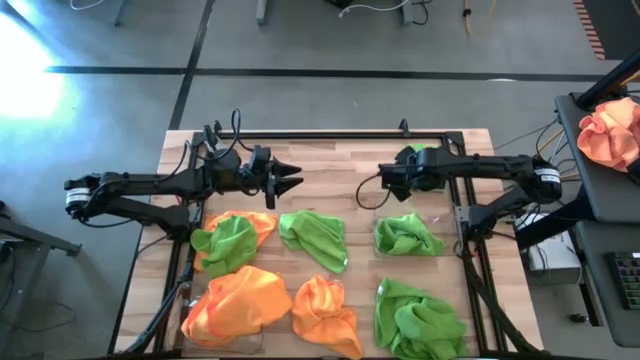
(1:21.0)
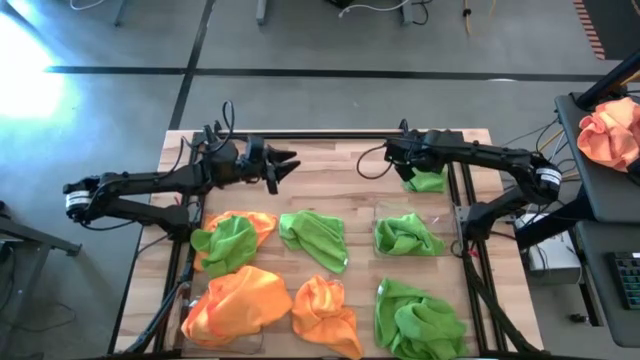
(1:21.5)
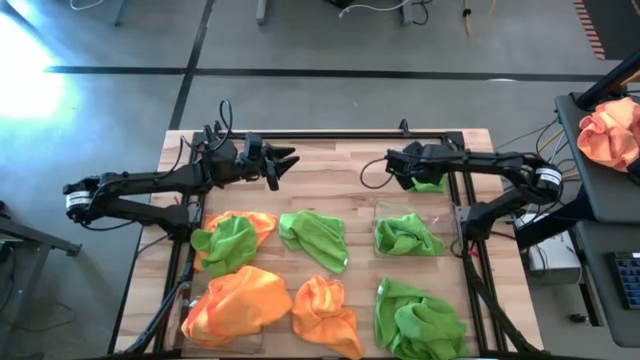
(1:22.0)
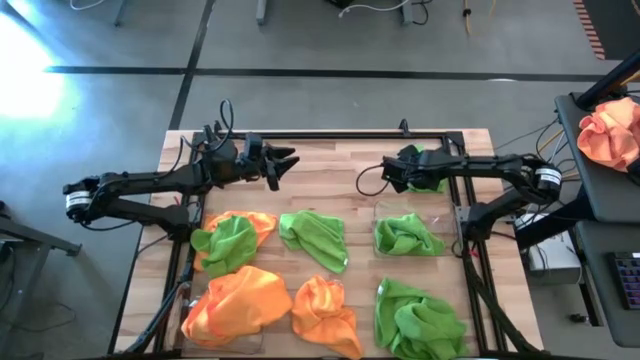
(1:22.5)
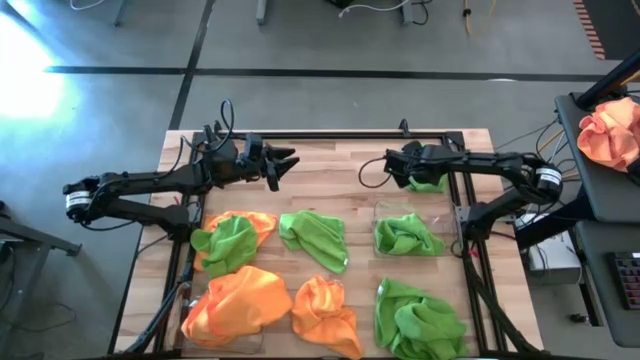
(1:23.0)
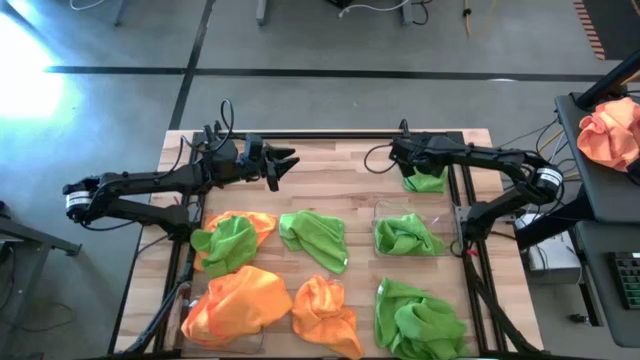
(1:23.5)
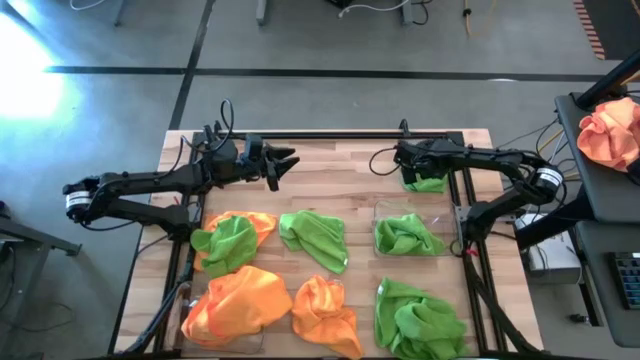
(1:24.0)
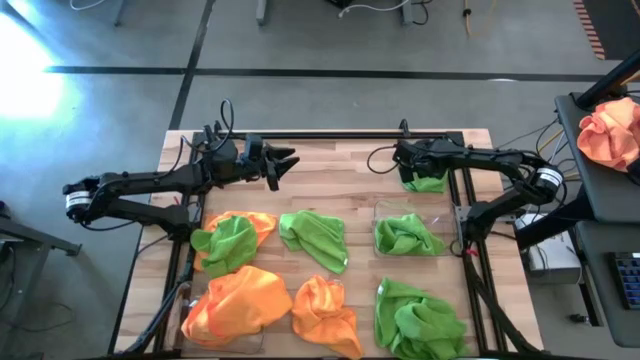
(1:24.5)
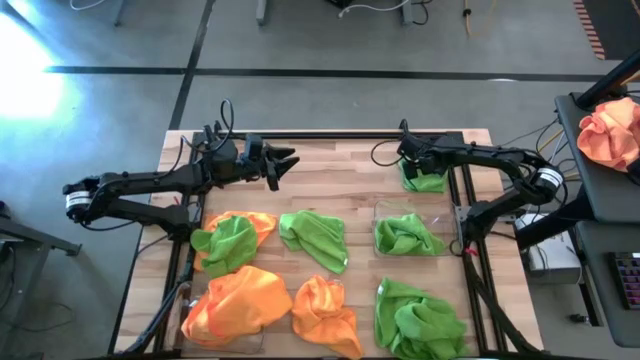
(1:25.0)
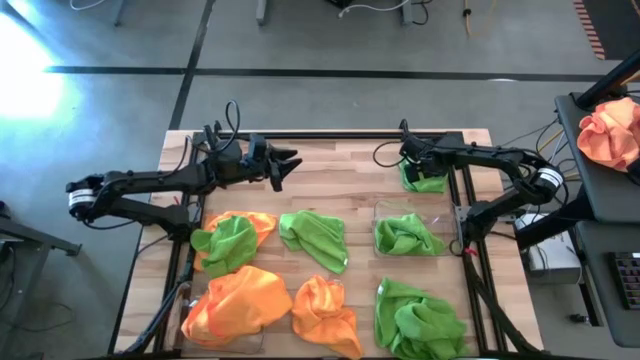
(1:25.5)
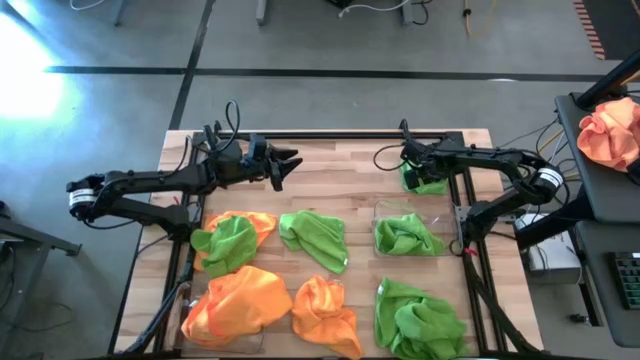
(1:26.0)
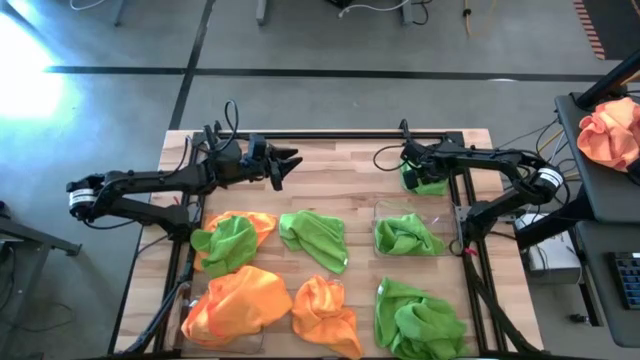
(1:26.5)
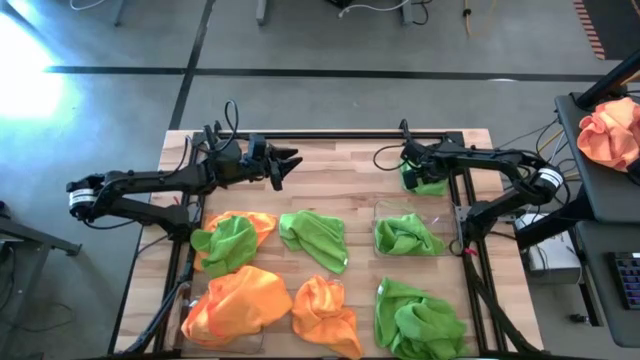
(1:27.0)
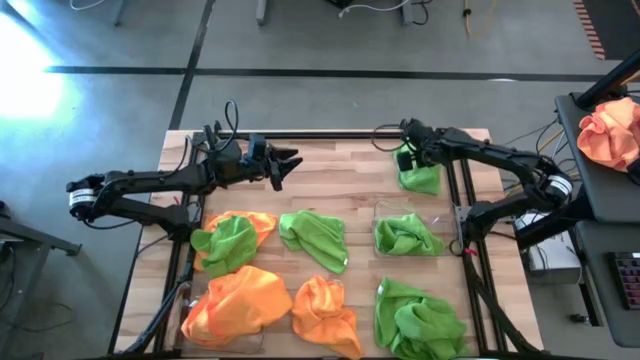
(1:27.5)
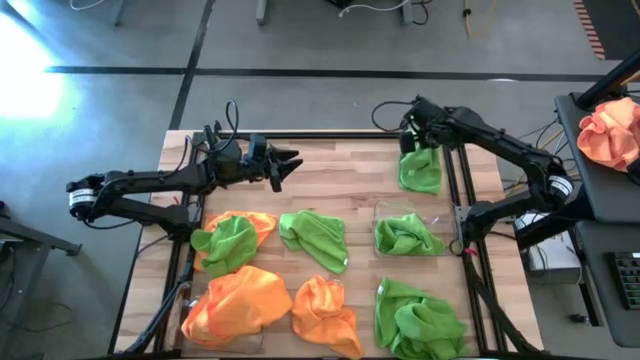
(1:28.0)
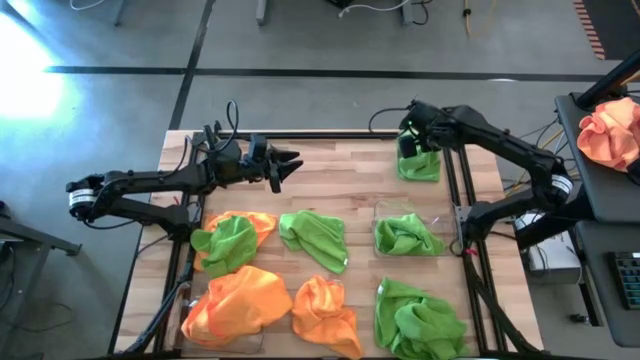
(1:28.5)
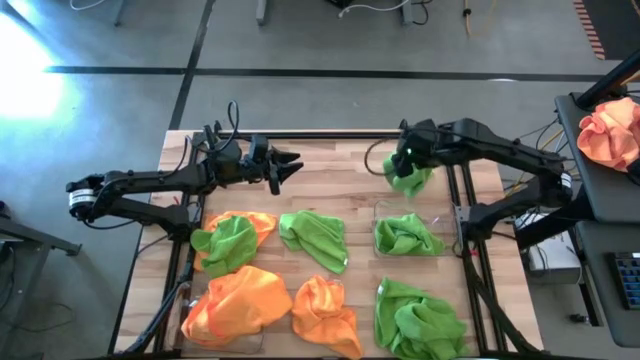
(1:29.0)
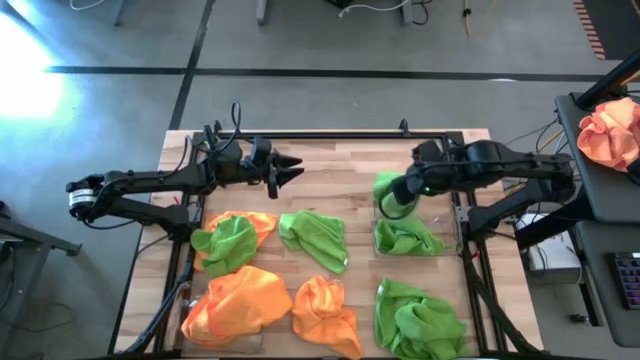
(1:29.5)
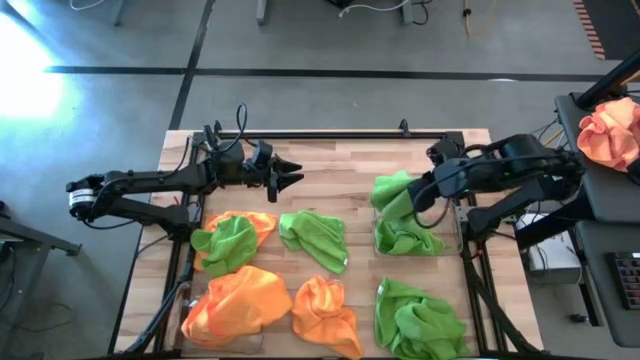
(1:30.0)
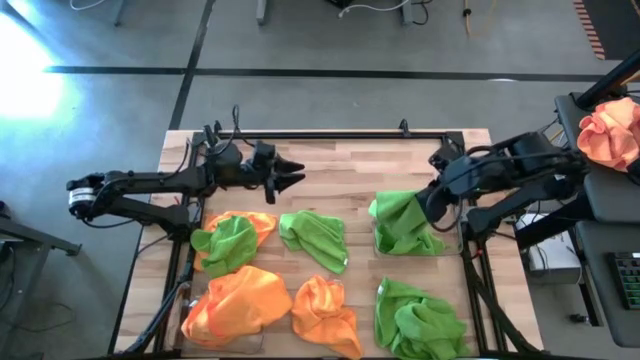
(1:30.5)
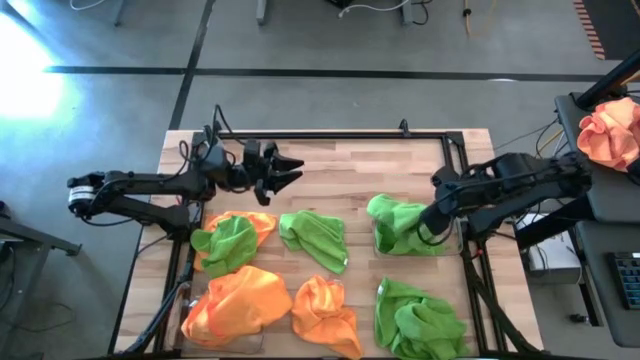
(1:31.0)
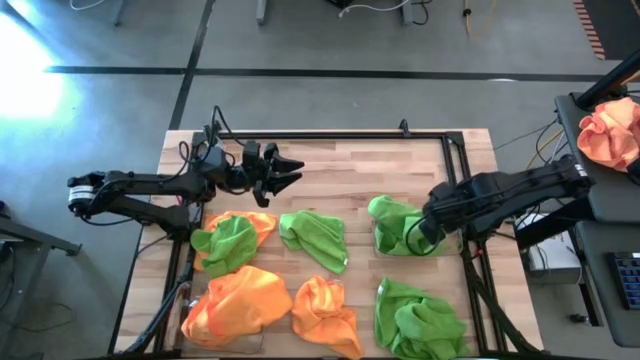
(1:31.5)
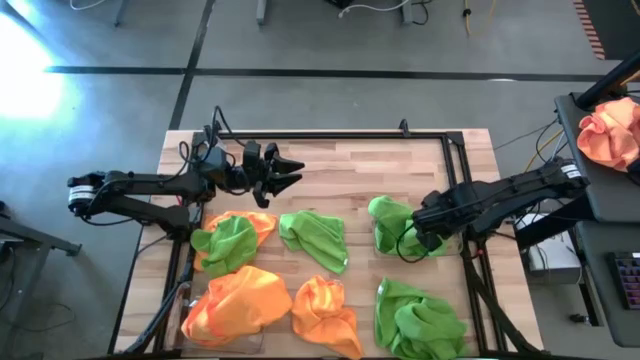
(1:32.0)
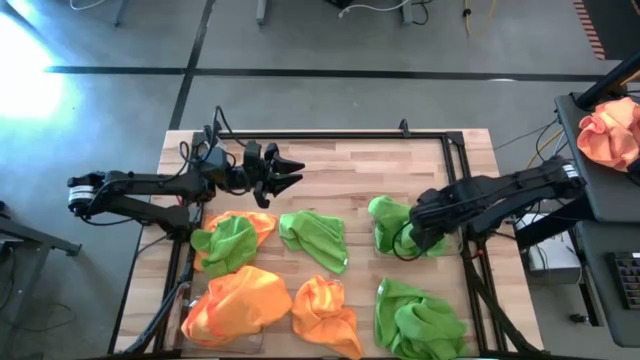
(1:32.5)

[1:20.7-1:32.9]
Task: Sort microfiber towel by color & place in baskets
Put the top right green towel into the right transparent bin

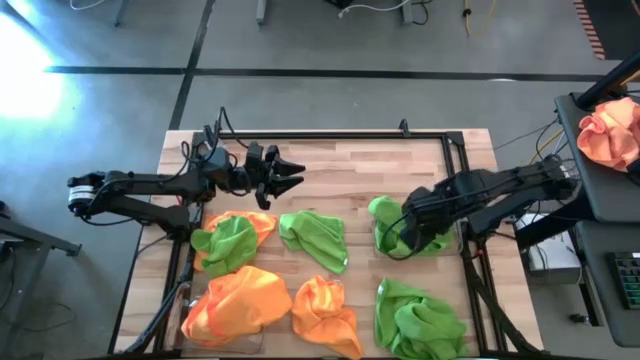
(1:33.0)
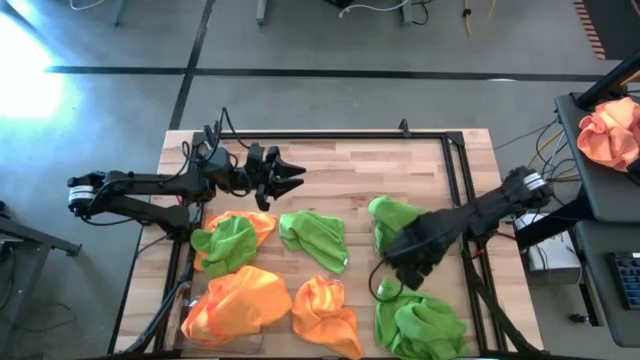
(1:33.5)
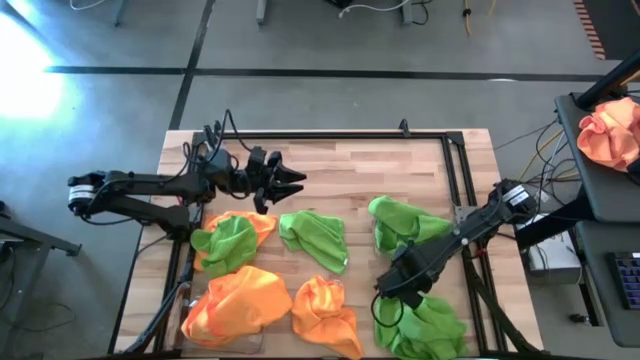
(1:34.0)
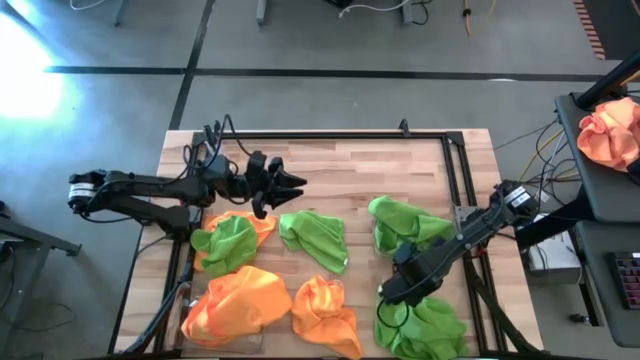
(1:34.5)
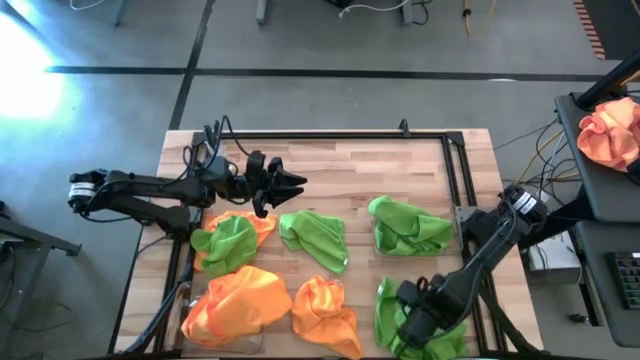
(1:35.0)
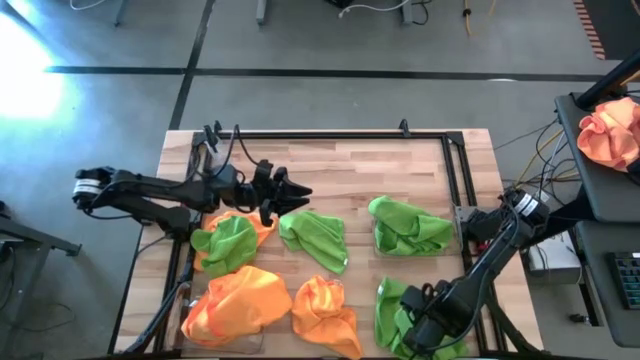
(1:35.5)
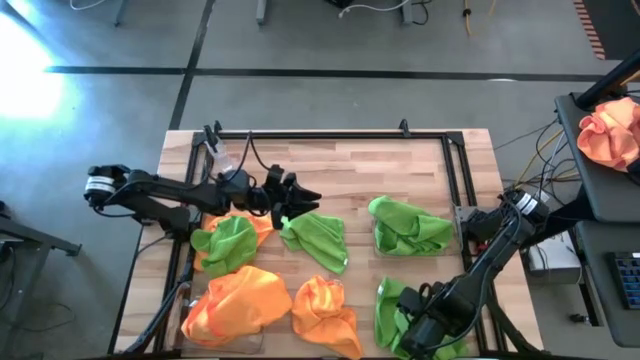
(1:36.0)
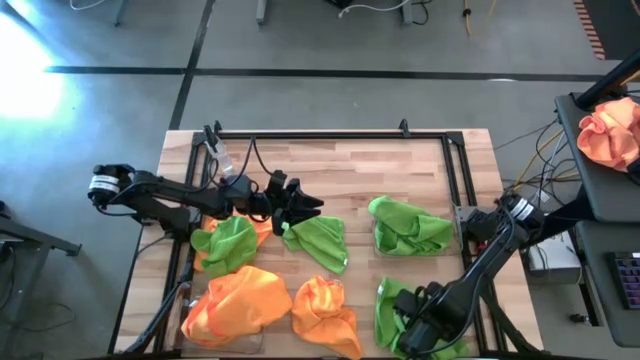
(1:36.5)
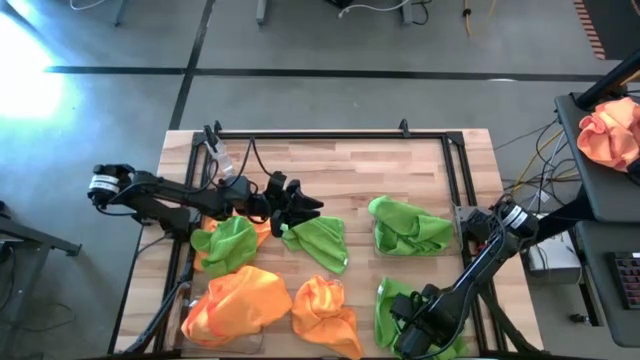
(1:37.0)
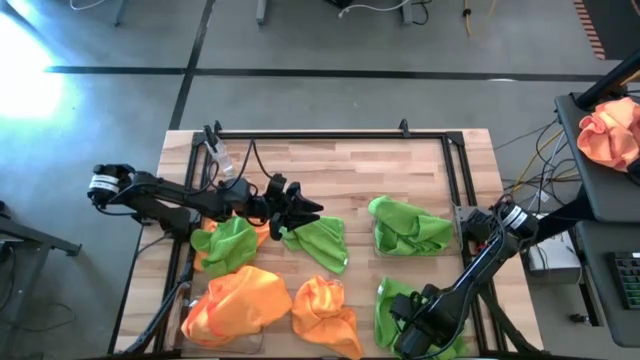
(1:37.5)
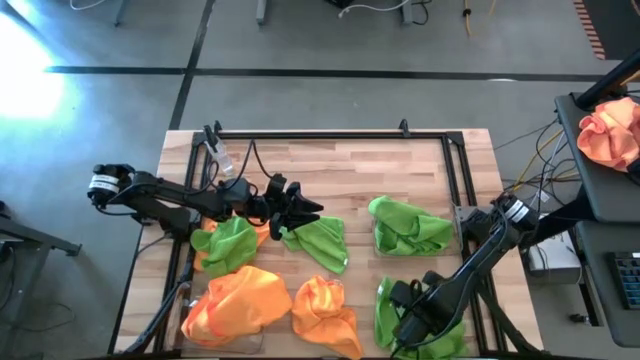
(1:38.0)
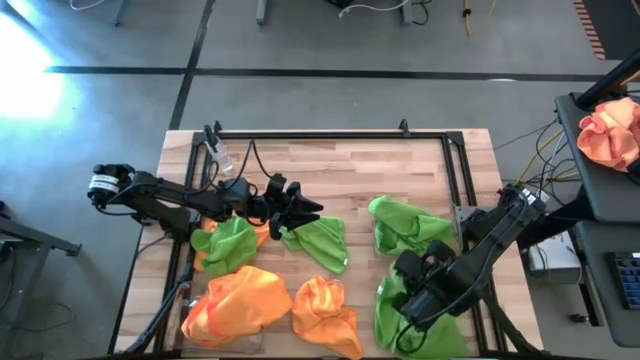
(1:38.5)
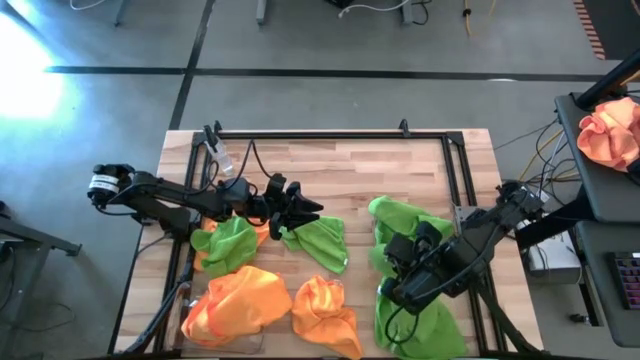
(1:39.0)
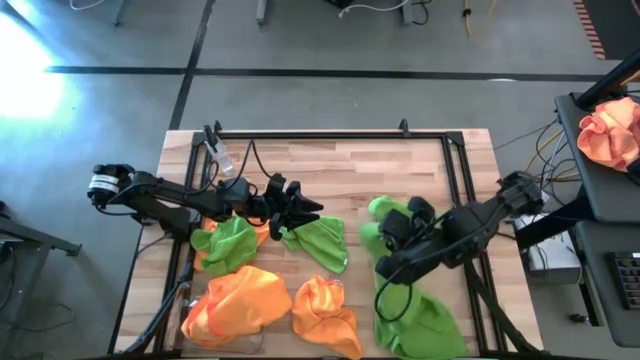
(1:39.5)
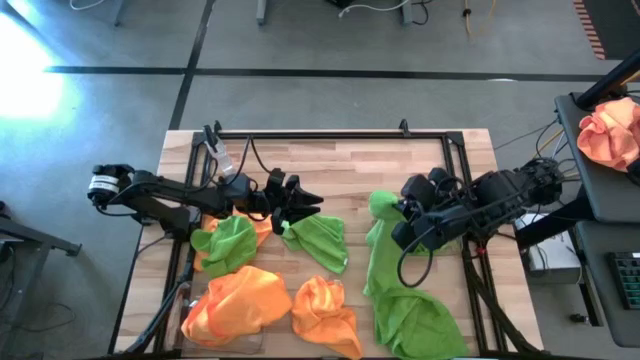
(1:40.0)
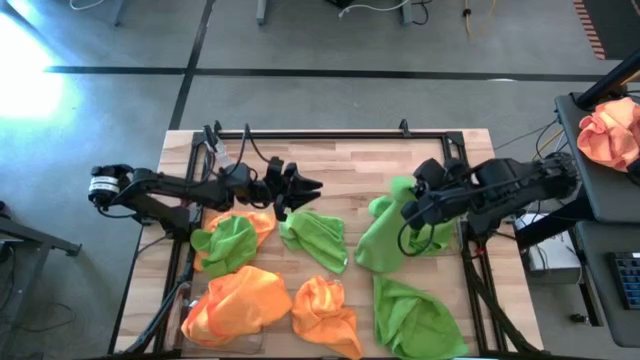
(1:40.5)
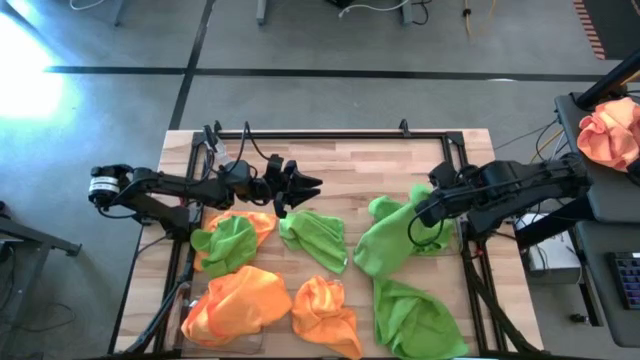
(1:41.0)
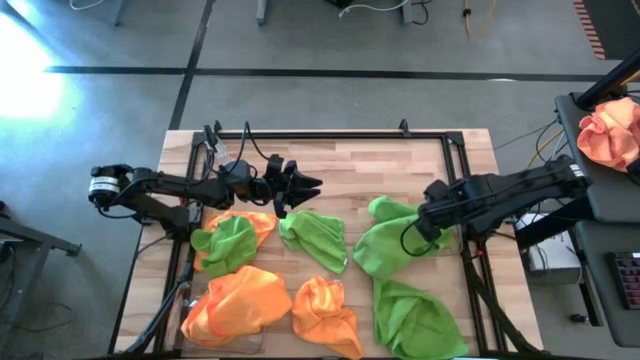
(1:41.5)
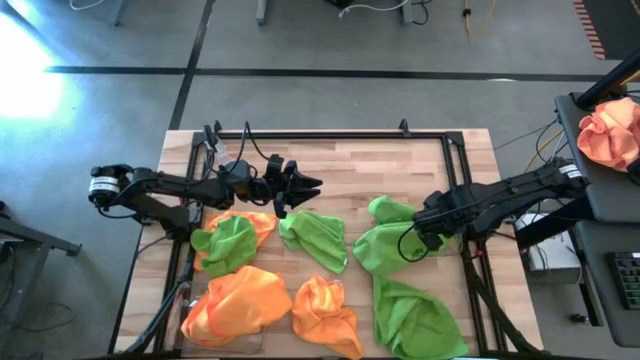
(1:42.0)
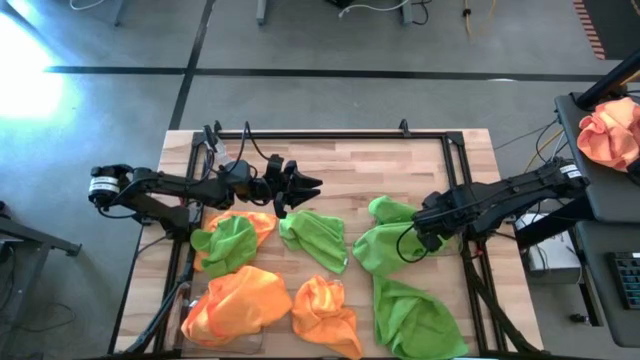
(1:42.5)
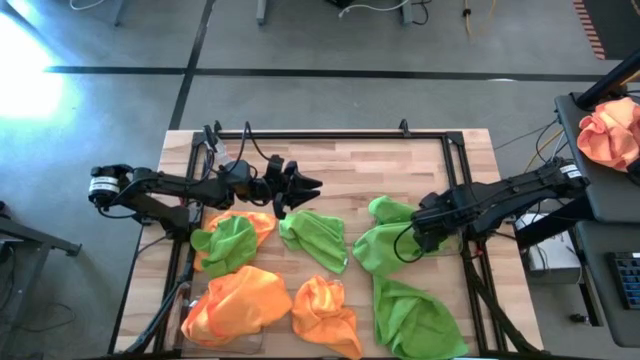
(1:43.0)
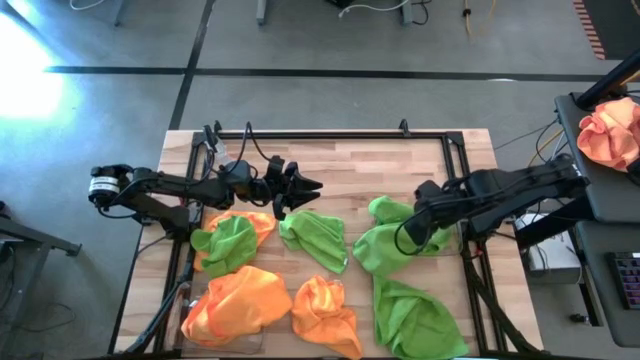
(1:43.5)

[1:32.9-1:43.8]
Put the bottom right green towel into the right transparent bin
